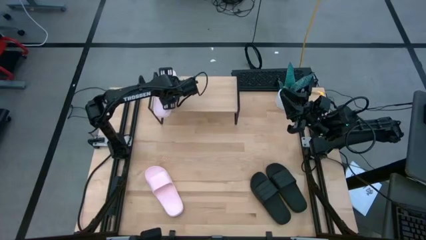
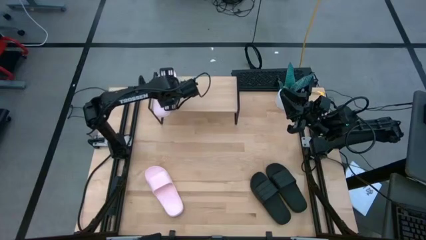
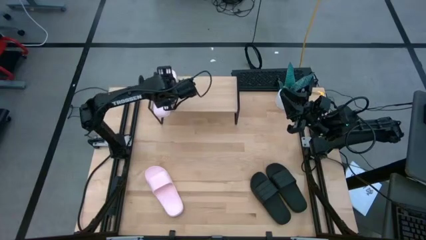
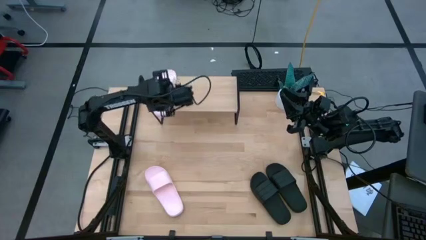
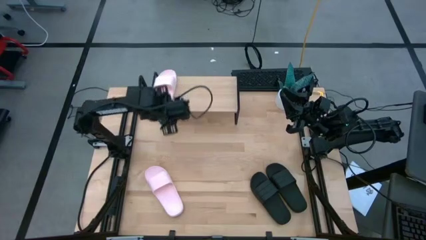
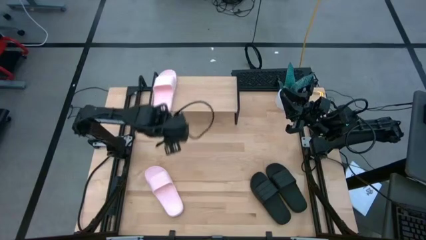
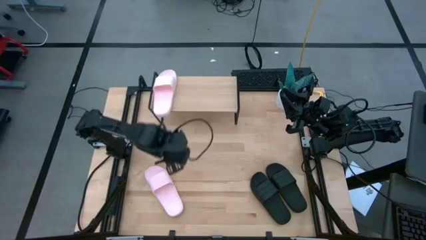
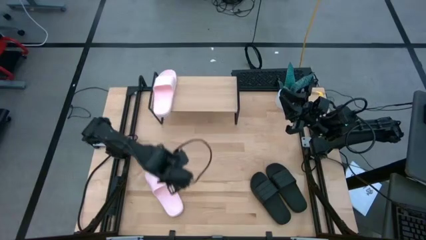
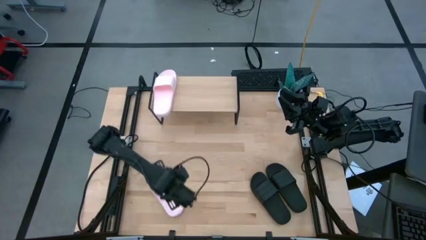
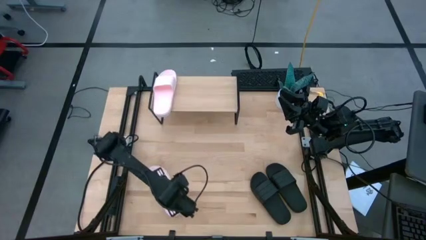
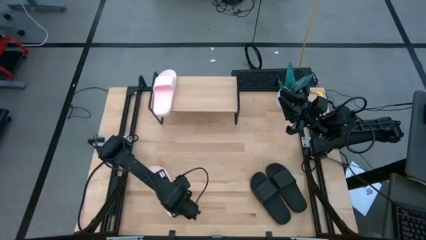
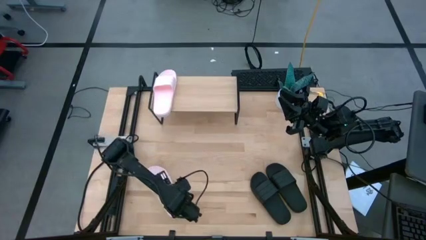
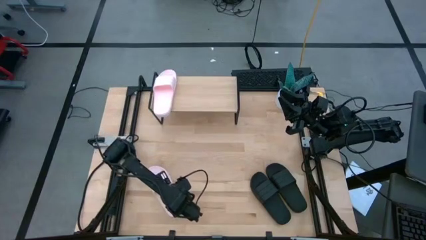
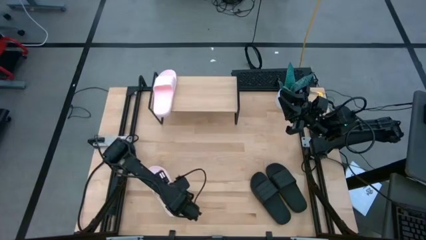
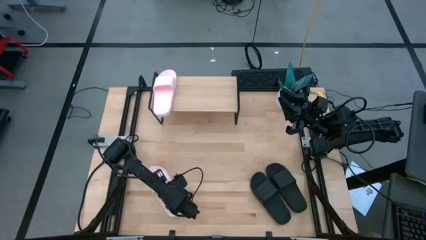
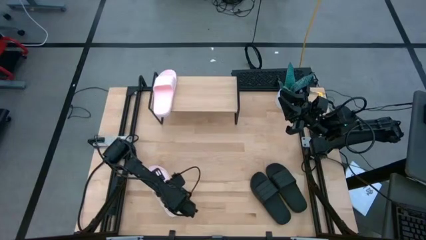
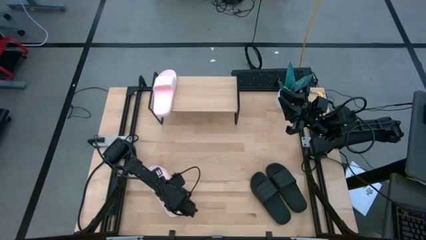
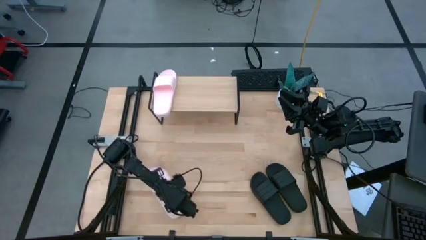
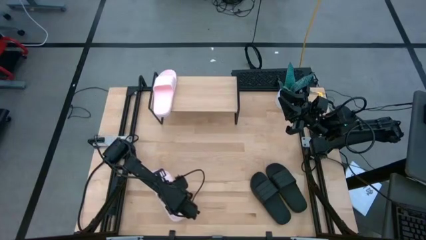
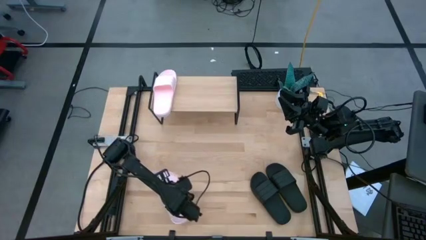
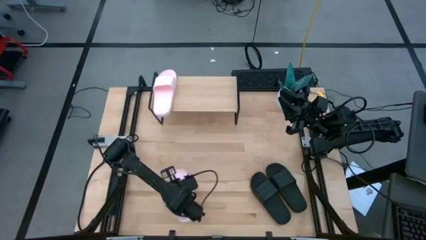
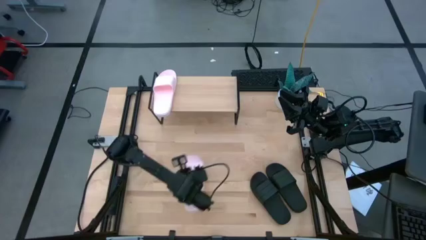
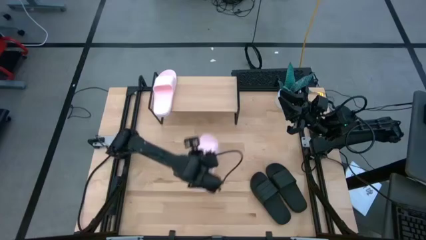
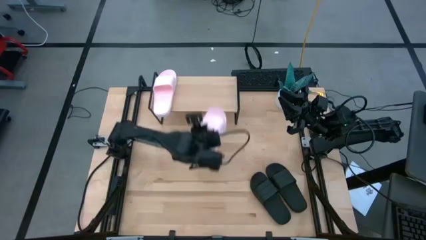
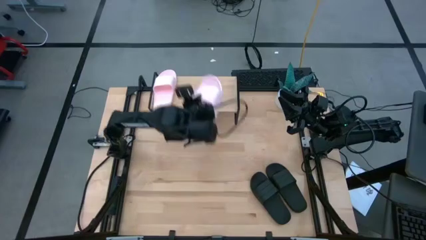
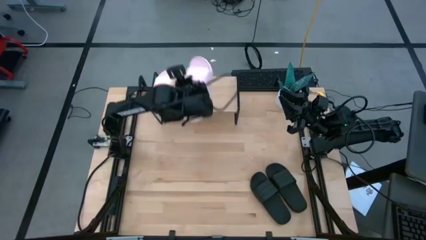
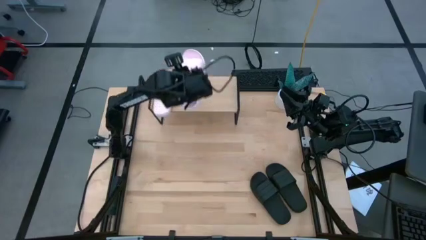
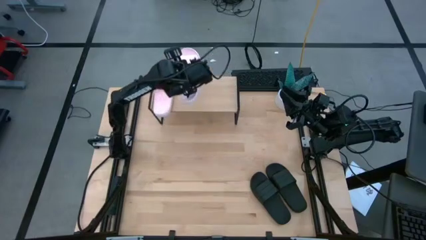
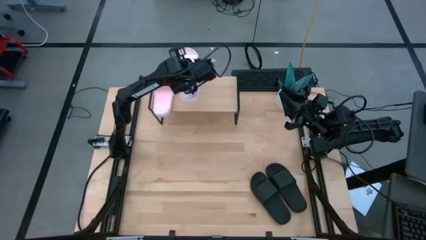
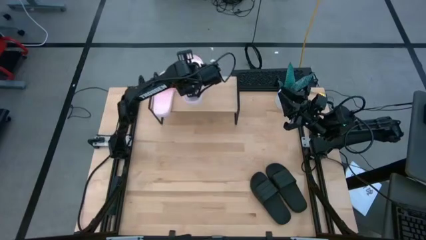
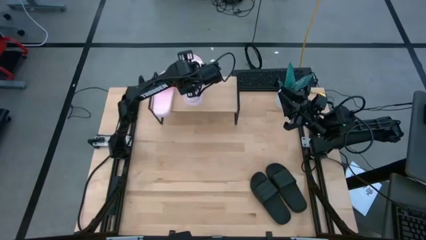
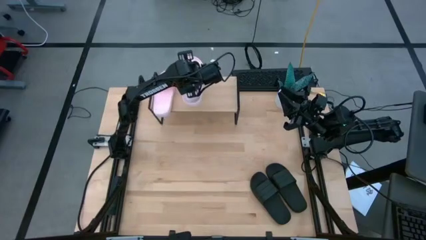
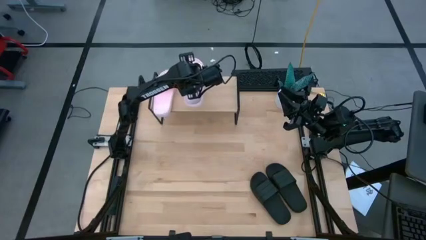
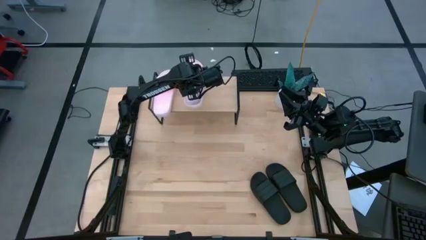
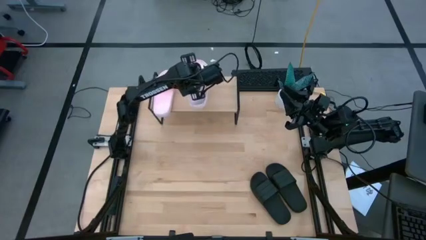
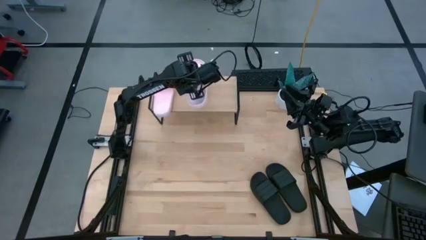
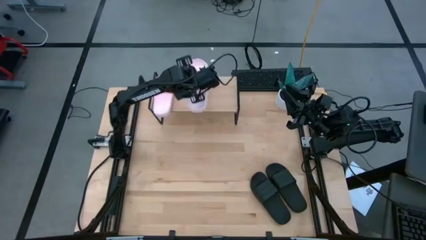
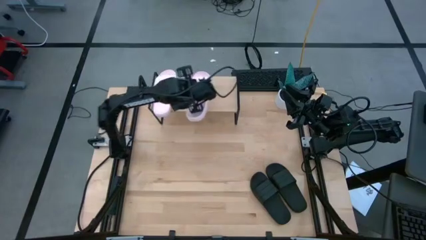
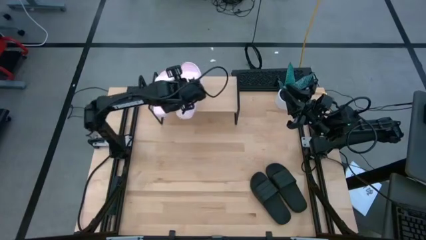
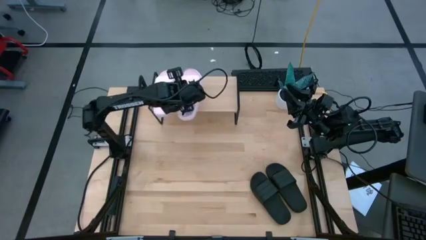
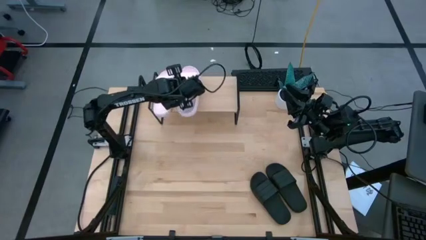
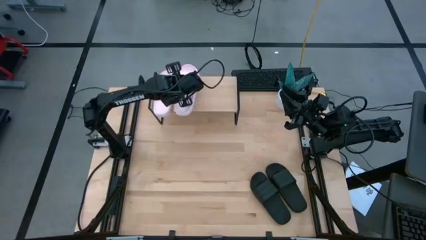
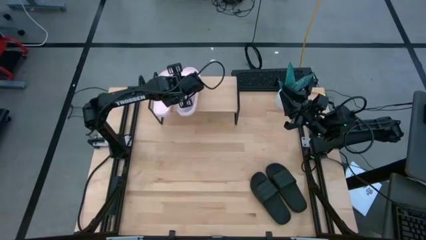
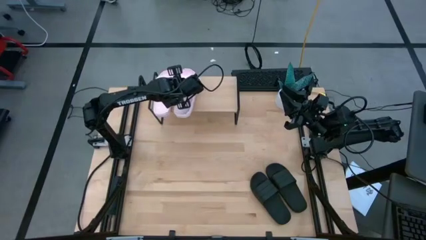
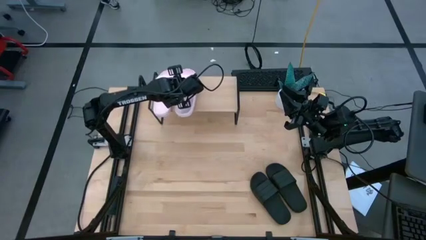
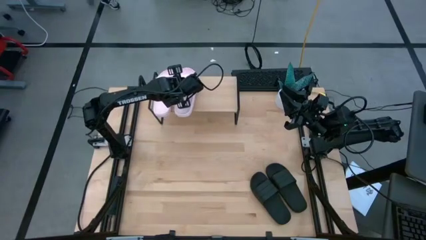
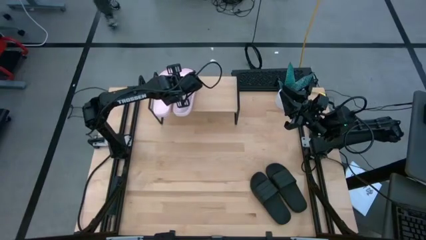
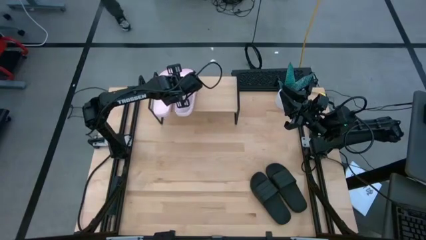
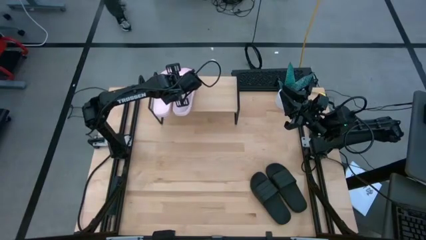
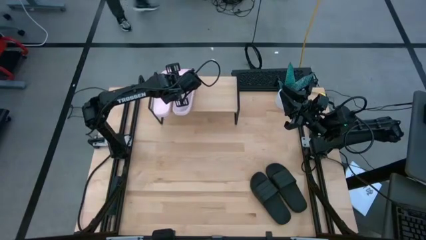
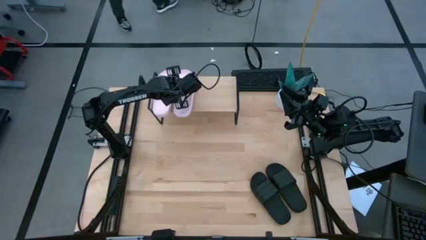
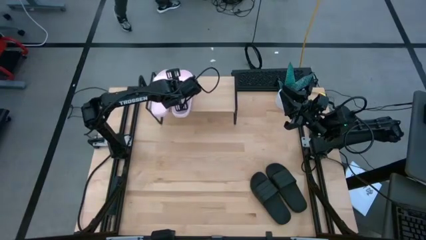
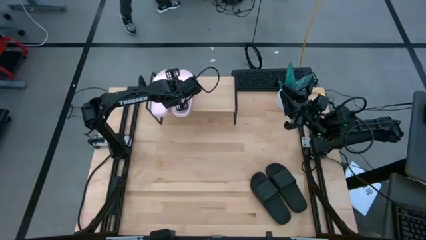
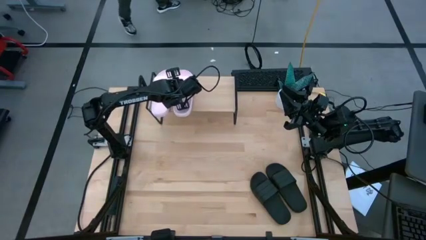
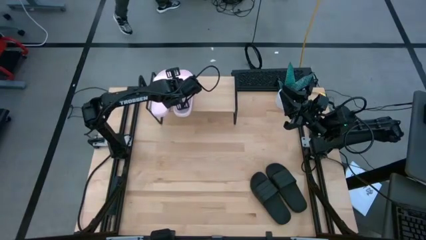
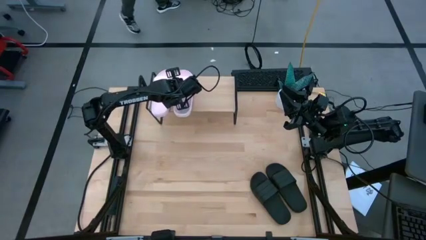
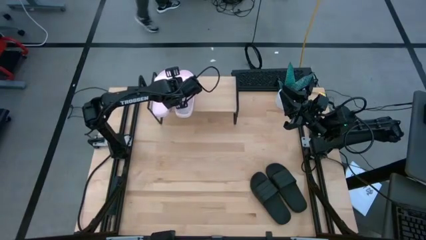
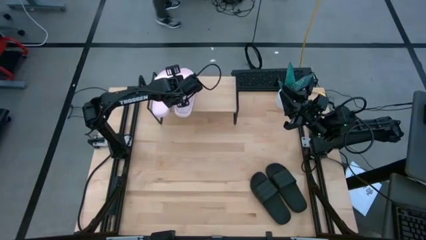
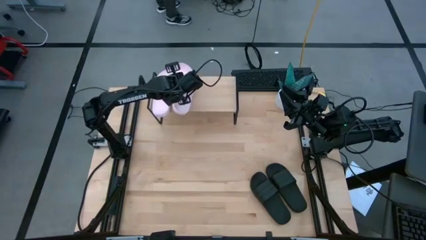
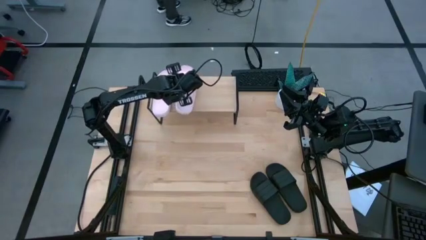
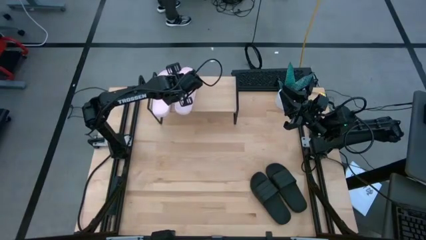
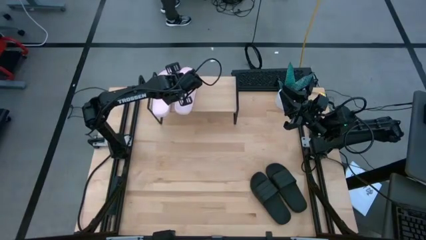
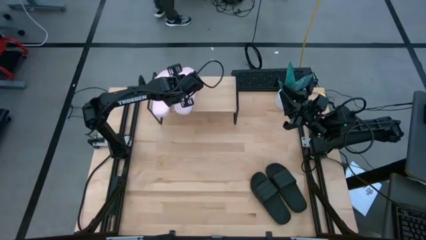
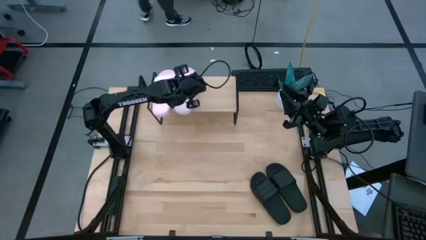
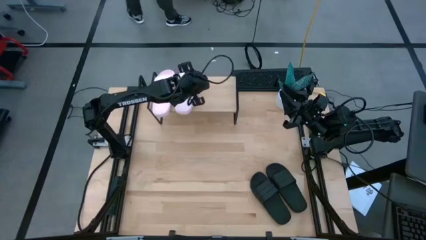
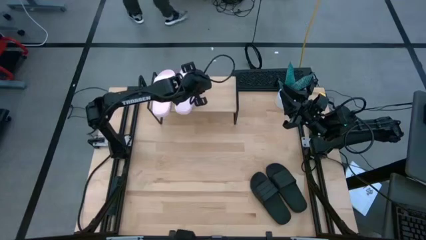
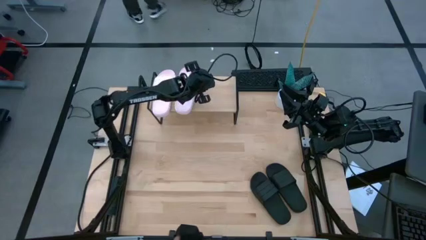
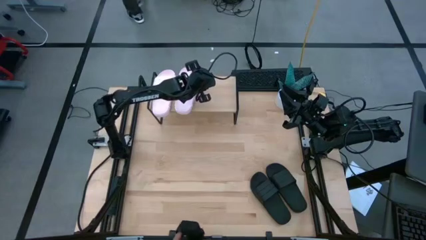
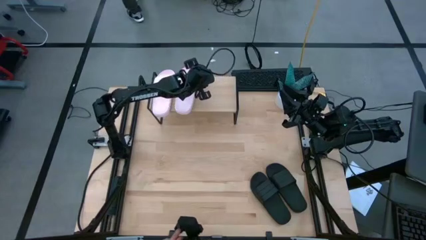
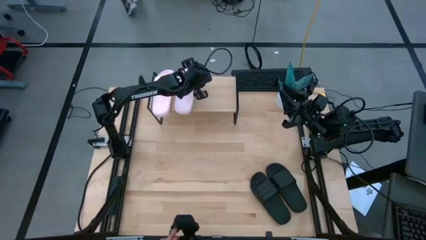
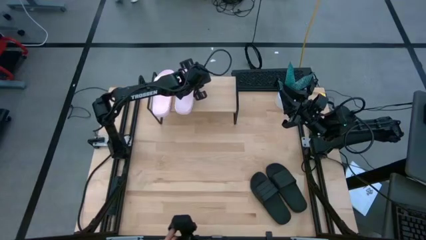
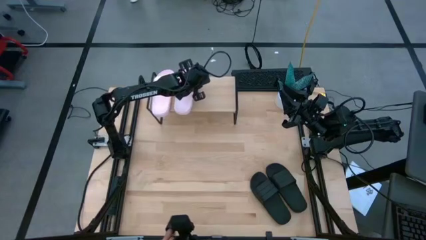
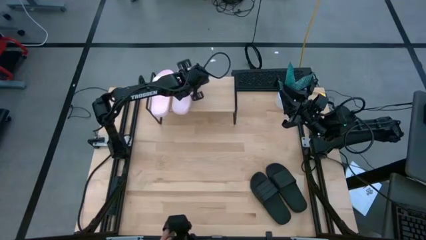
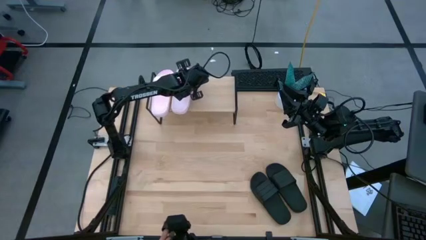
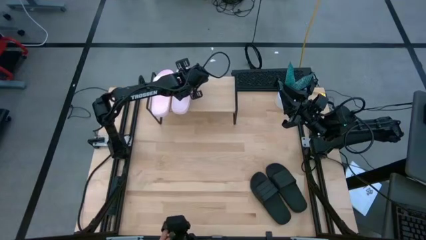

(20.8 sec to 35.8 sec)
Task: Pick and place slides into the shelf
Put the pink slipper on the shelf
